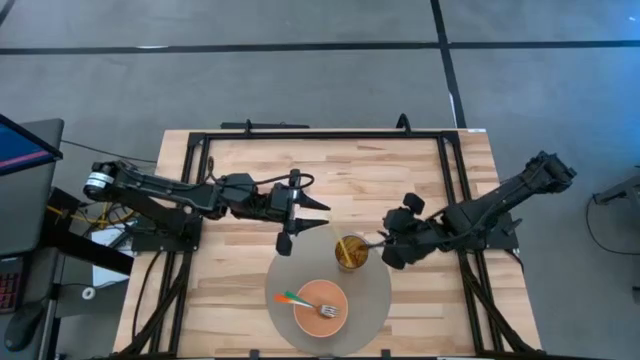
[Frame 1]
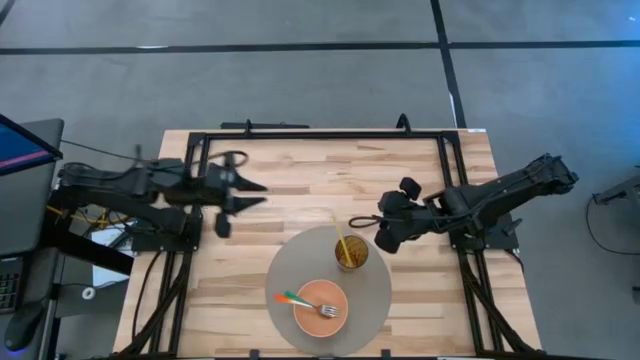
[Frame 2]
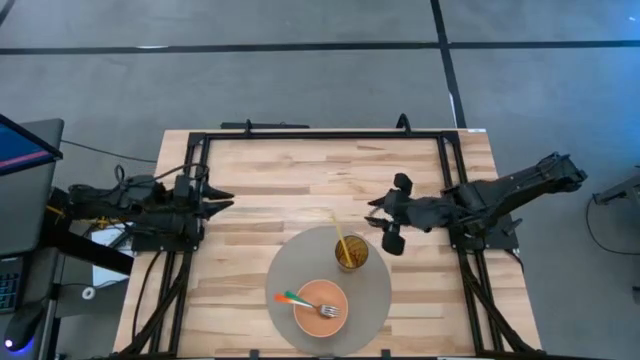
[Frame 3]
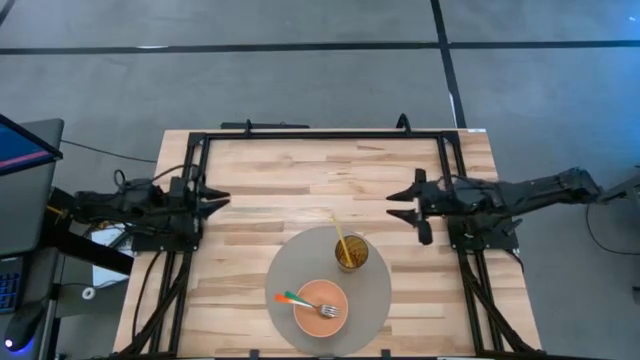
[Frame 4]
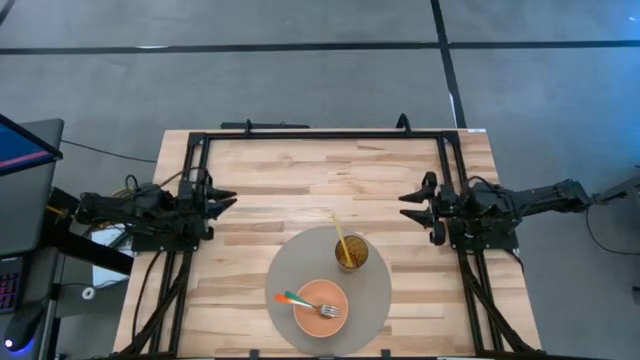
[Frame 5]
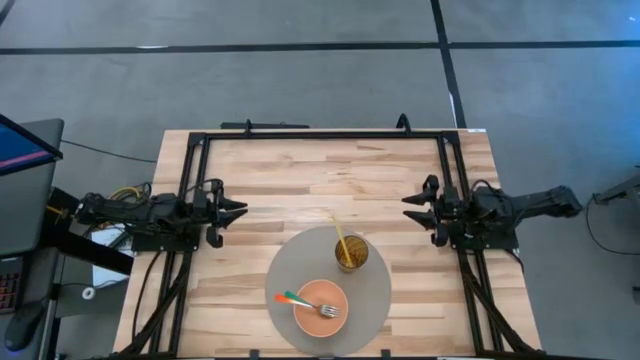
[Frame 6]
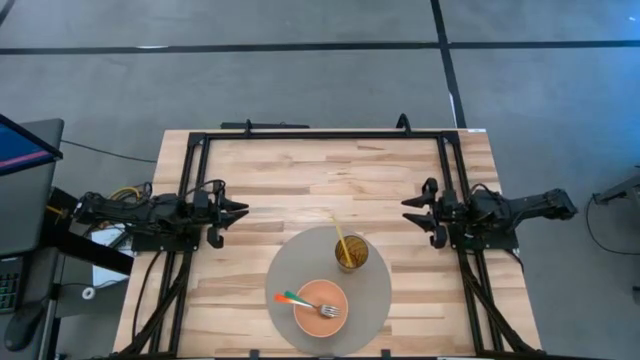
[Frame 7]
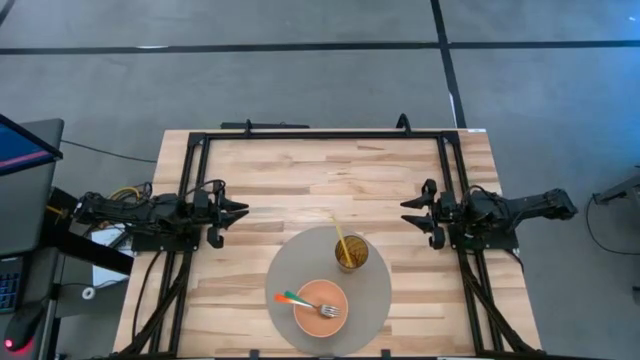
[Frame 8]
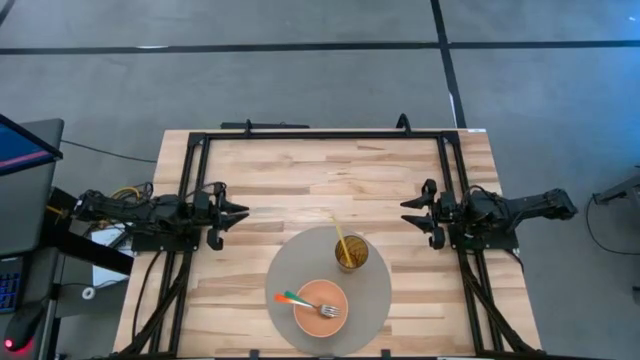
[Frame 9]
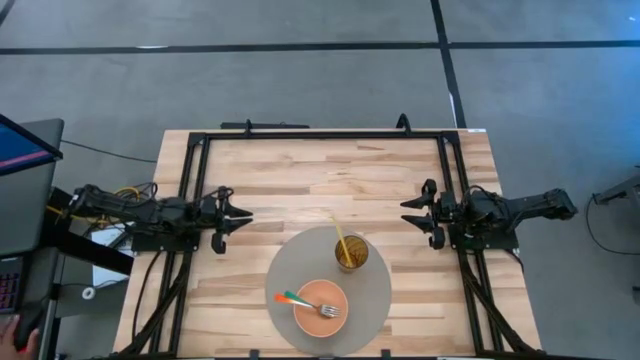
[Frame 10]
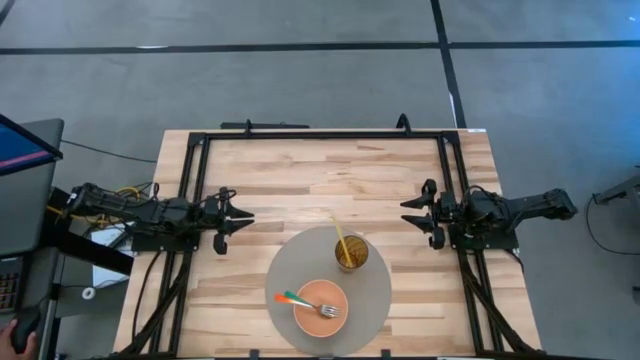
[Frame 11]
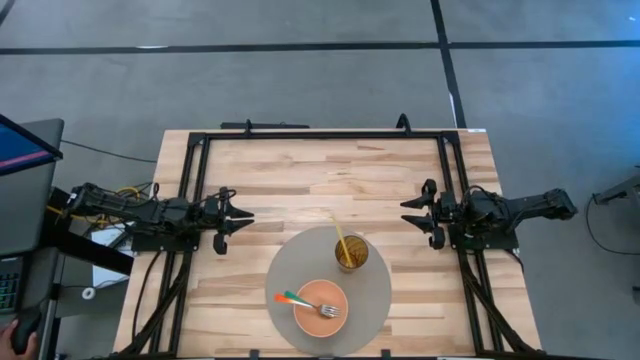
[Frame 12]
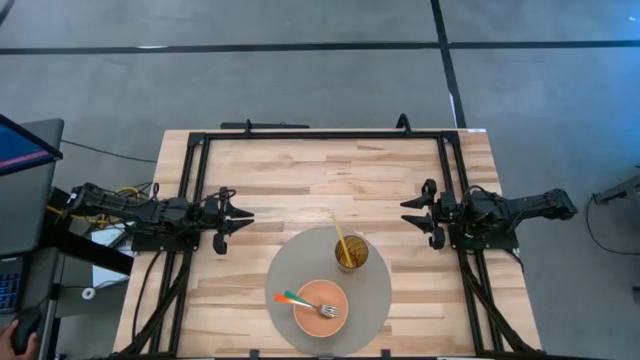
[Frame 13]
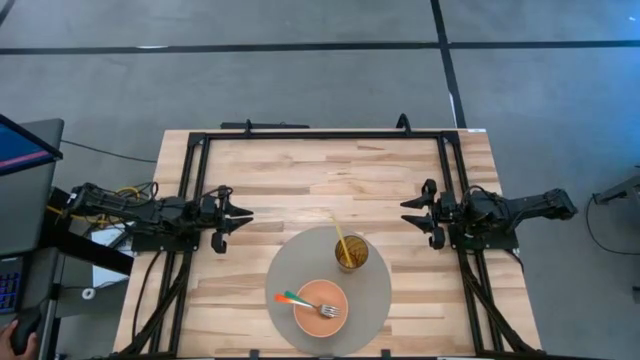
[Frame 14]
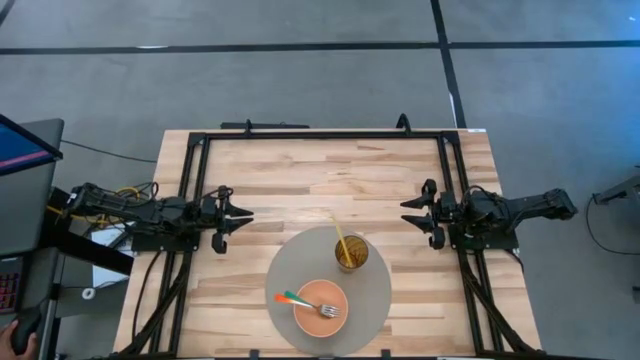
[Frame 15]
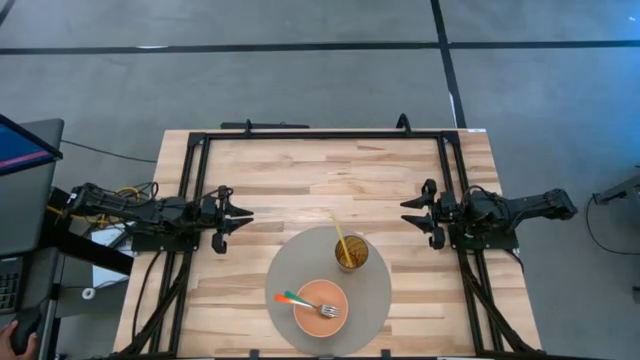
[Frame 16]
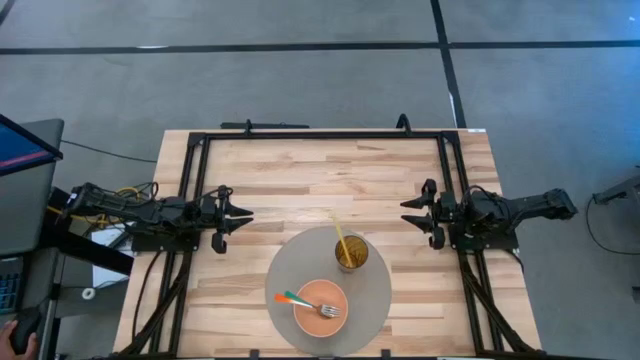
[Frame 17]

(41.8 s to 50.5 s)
Task: Pick & Place Utensil
Return to Home Position

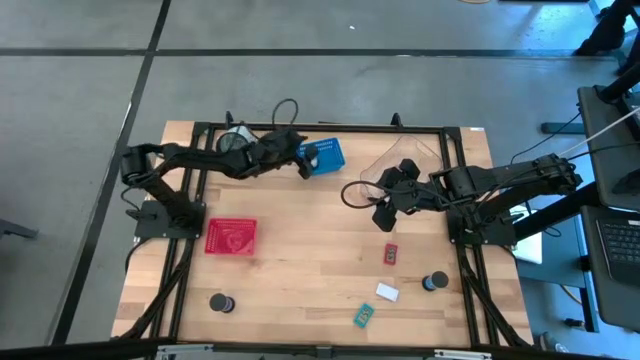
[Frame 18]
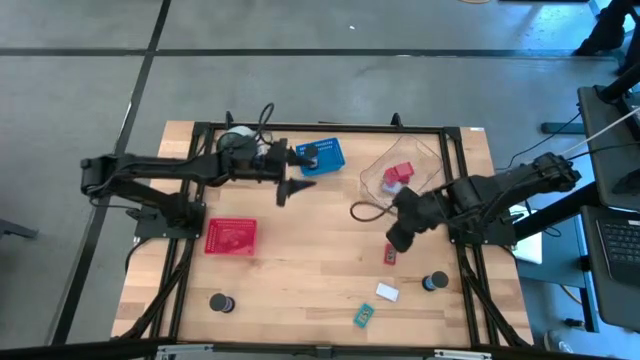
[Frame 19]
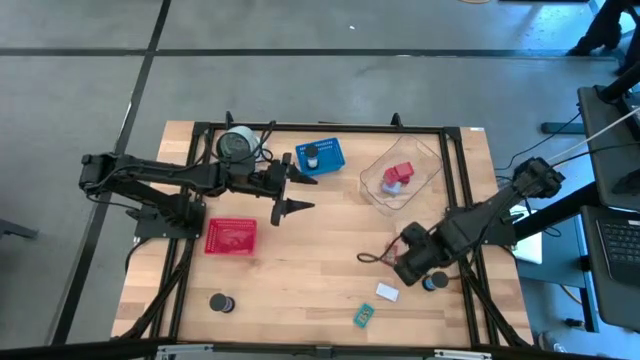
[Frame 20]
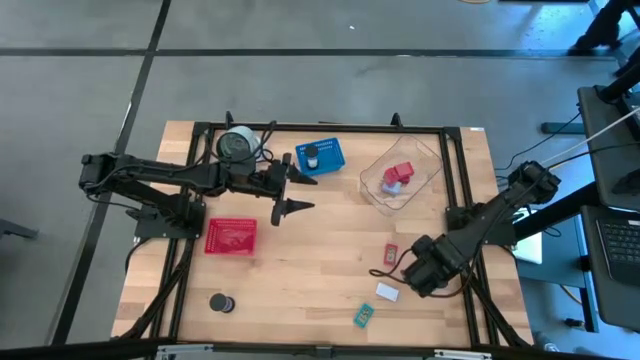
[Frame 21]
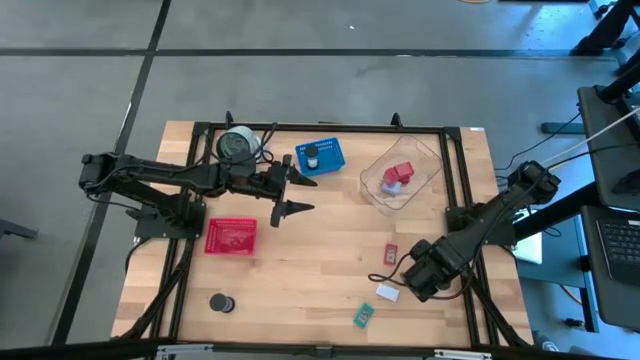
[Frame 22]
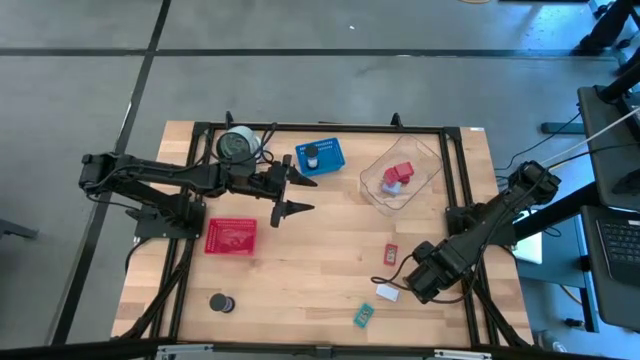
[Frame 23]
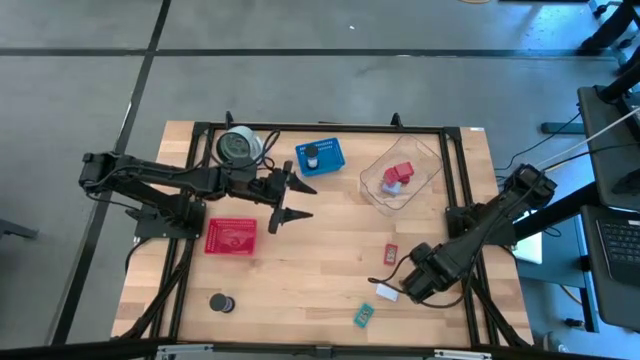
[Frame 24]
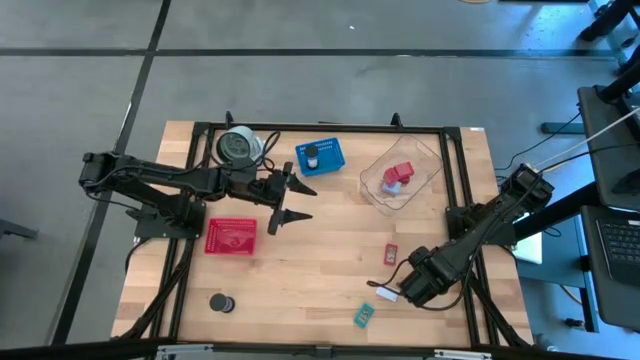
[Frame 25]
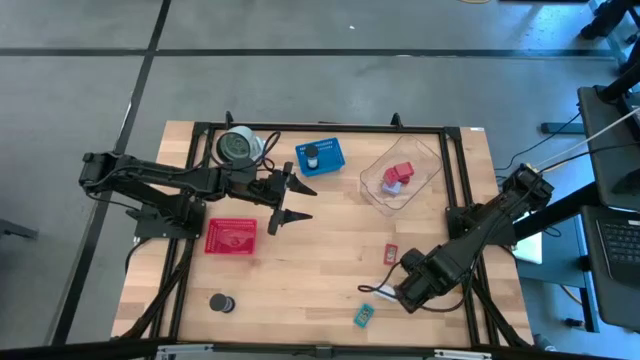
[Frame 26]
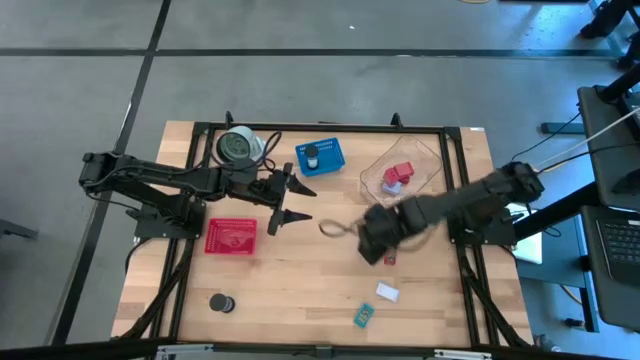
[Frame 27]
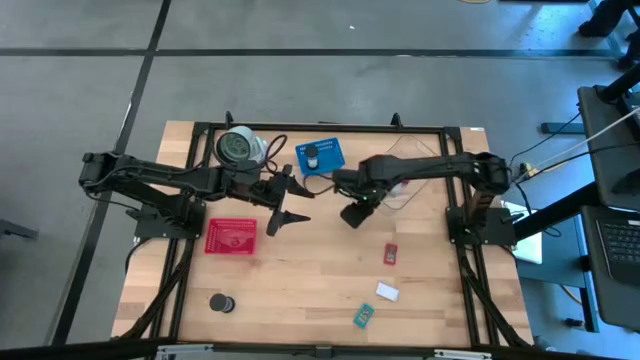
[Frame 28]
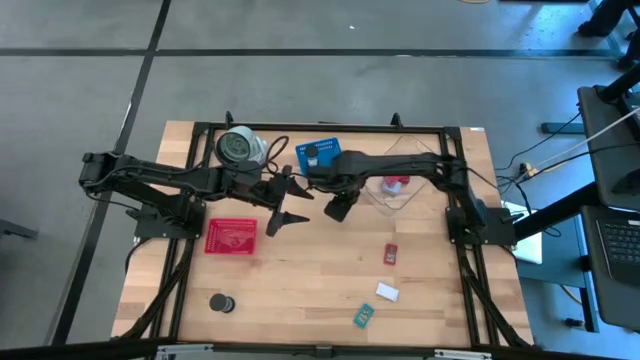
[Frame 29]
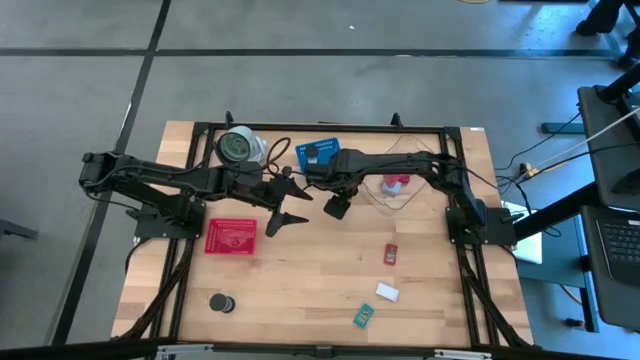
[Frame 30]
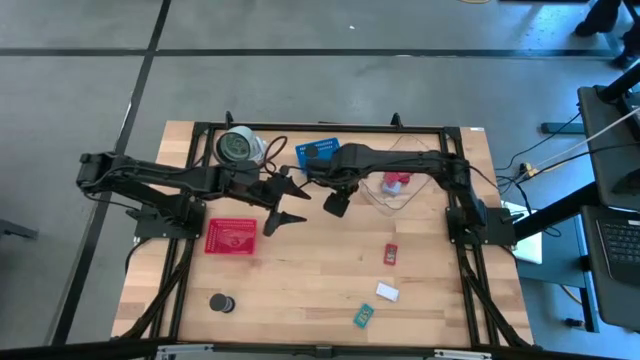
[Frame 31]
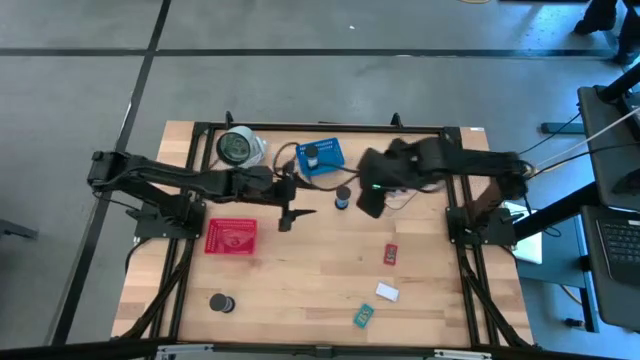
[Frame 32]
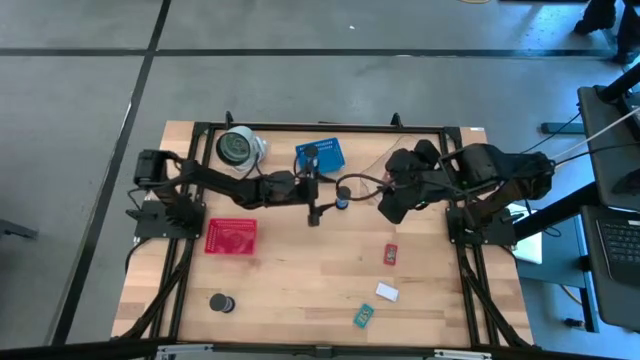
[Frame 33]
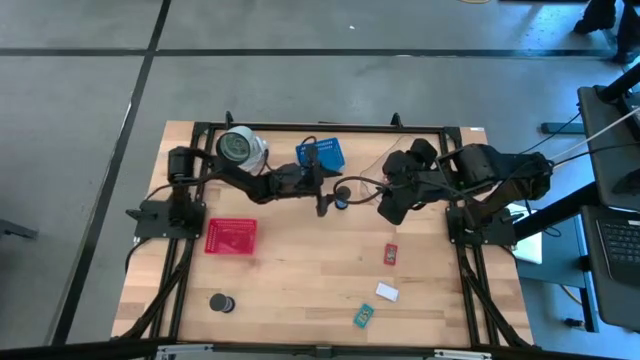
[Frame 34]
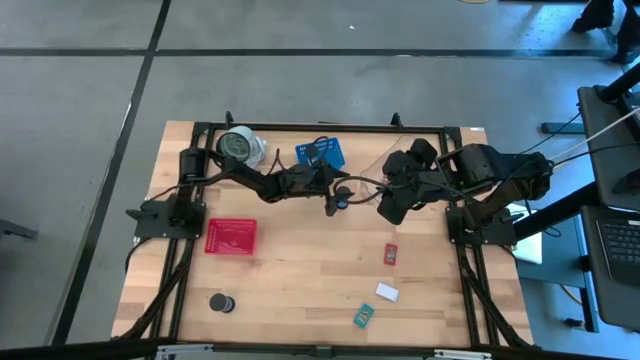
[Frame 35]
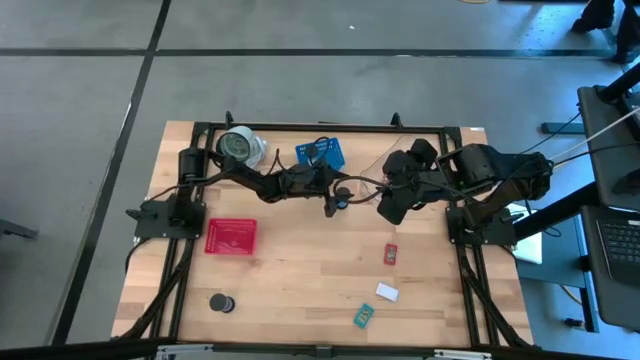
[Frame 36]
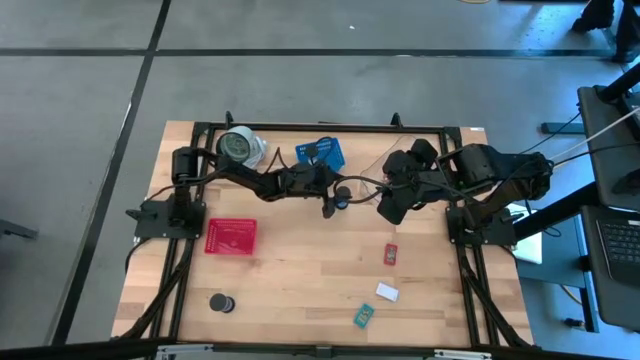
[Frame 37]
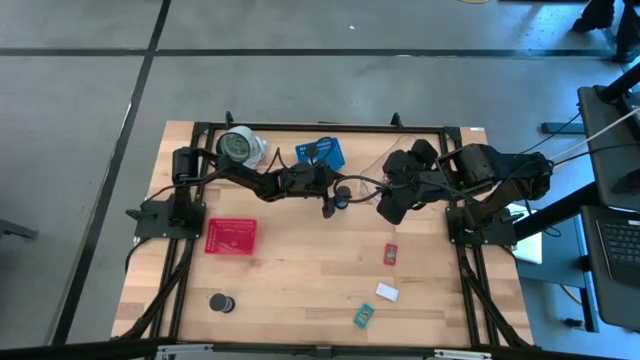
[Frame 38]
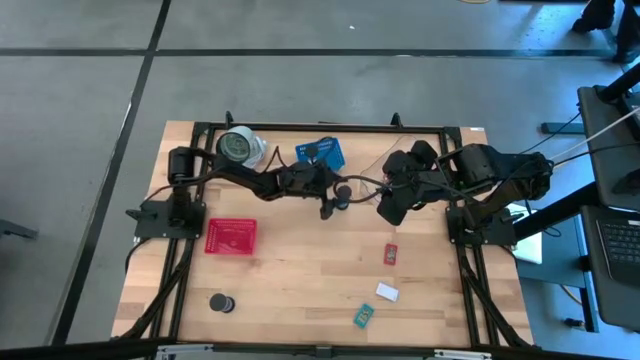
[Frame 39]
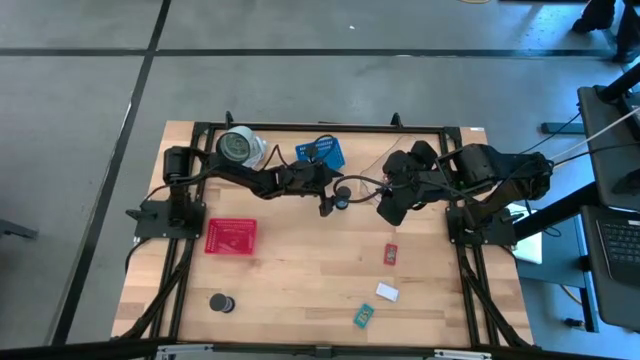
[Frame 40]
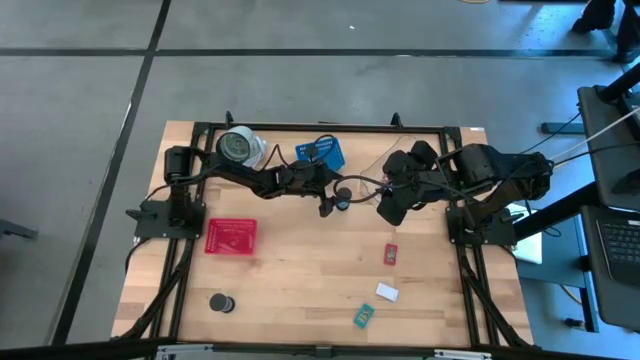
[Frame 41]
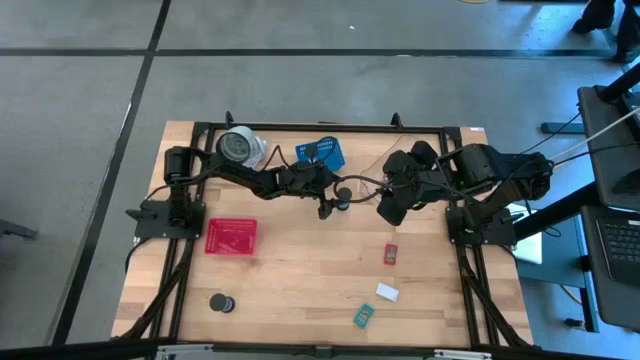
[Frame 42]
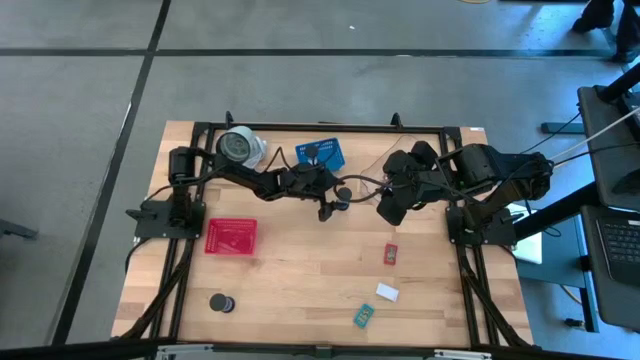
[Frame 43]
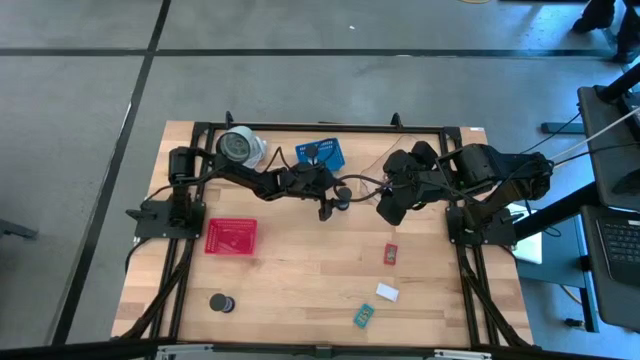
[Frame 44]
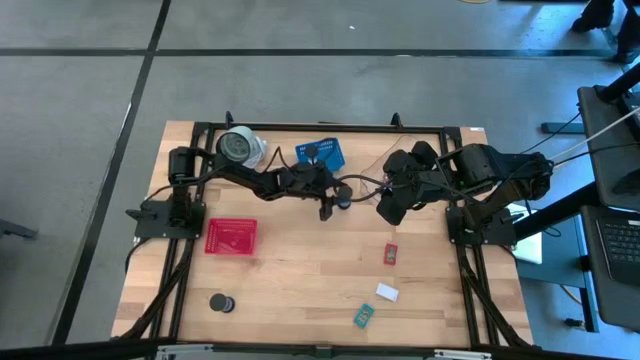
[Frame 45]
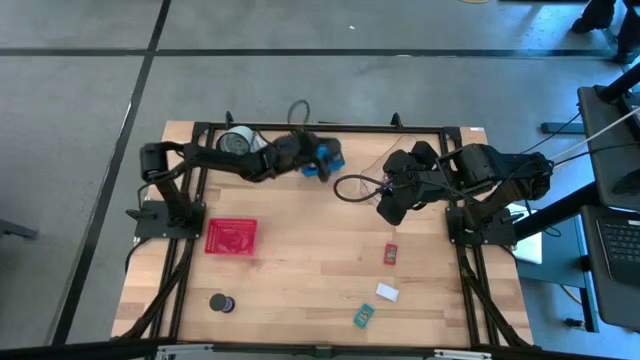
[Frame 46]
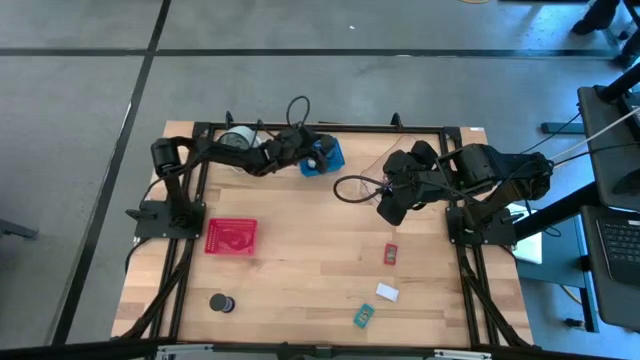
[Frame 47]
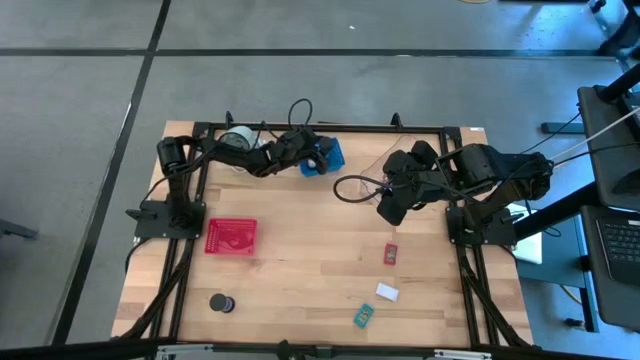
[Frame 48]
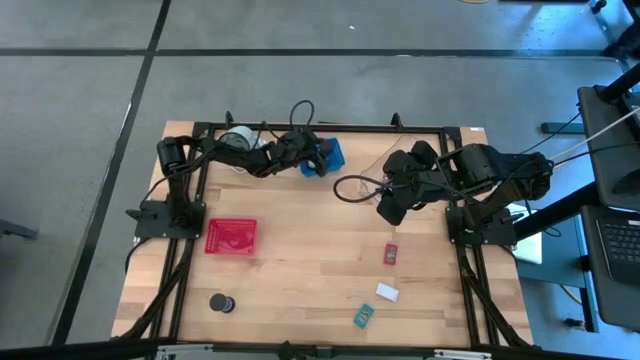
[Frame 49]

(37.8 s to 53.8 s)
Task: Pick & Place Office items
Put the bottom-right black hourglass into the blue basket
